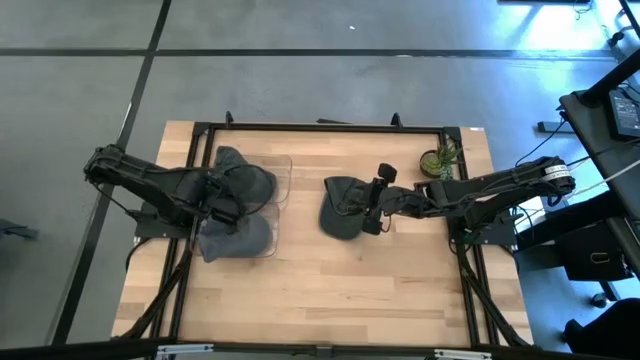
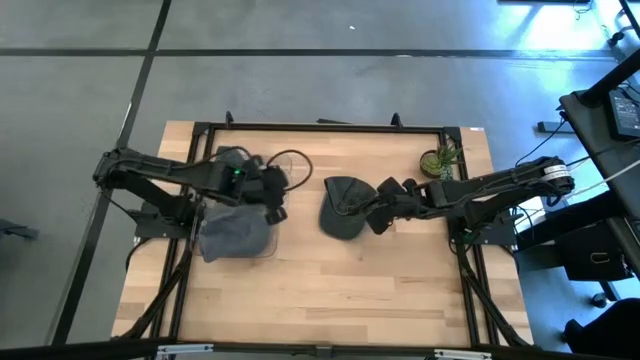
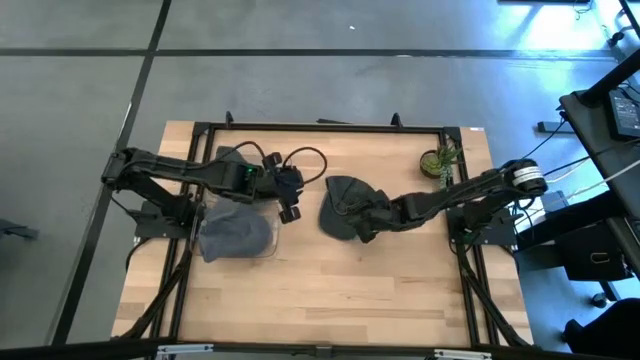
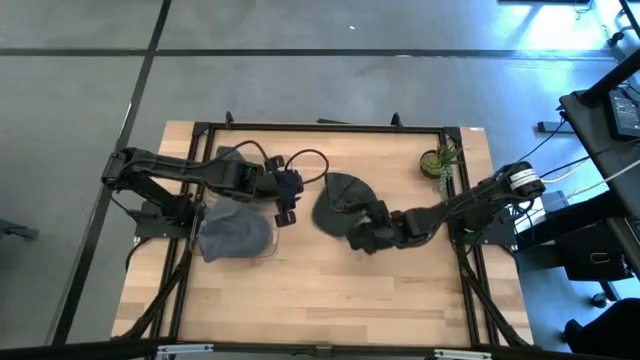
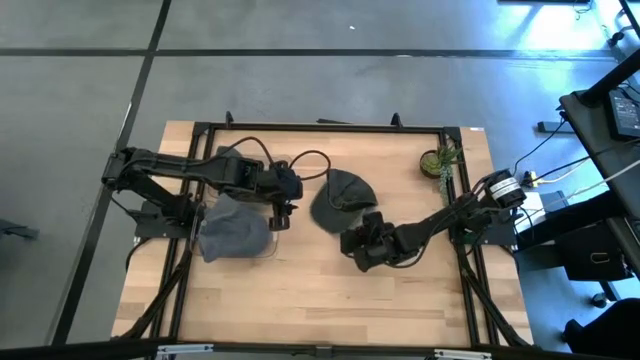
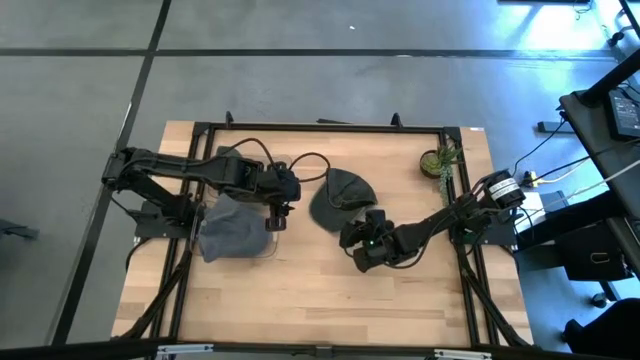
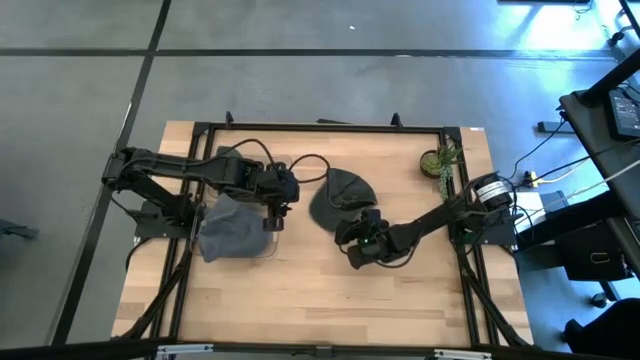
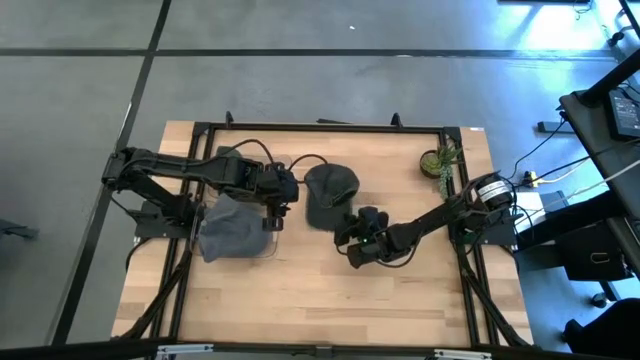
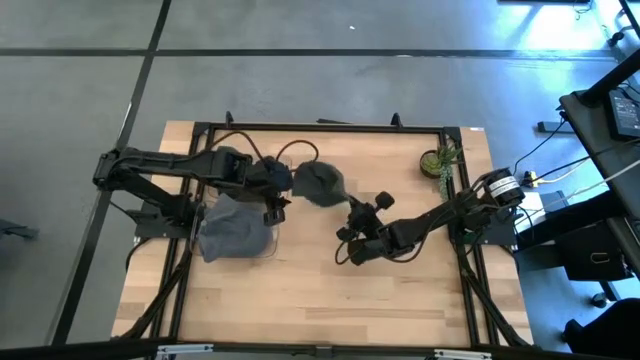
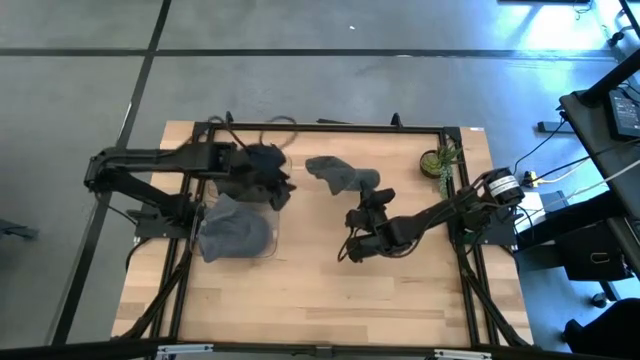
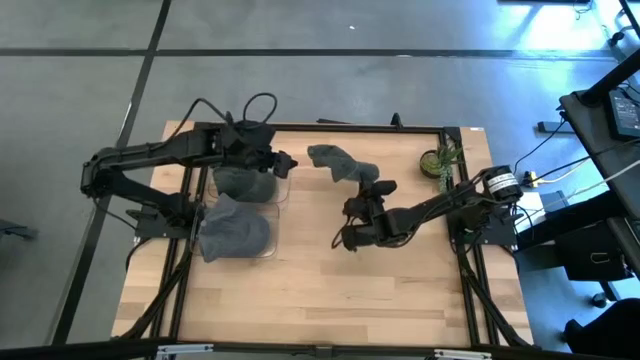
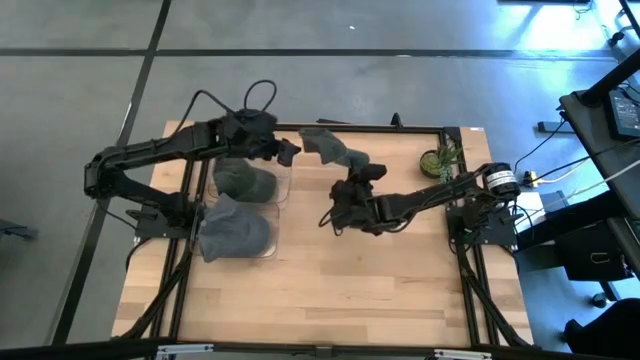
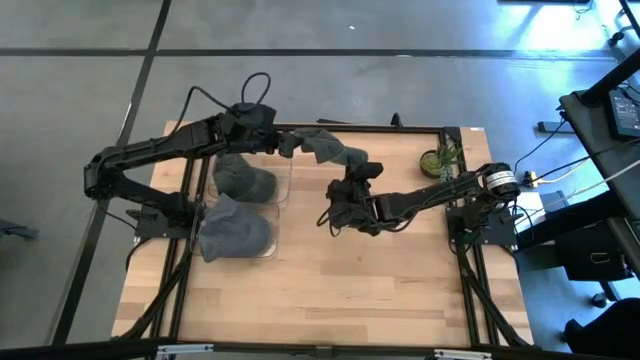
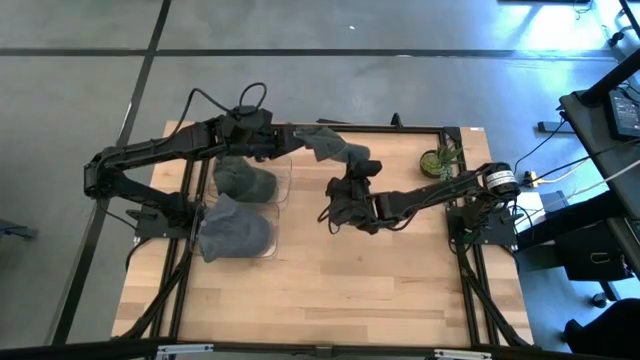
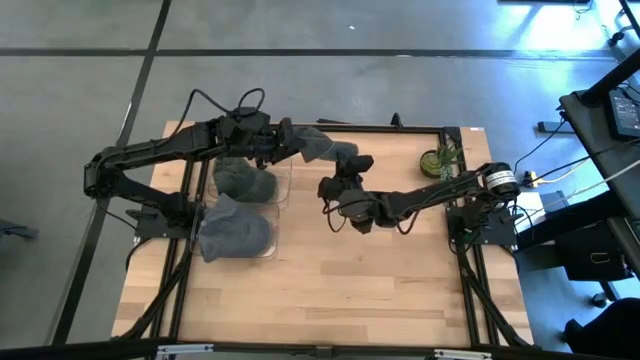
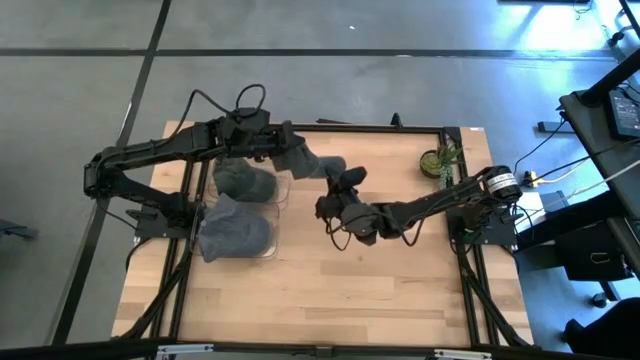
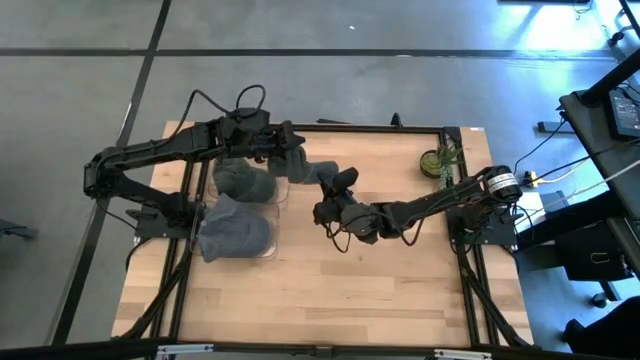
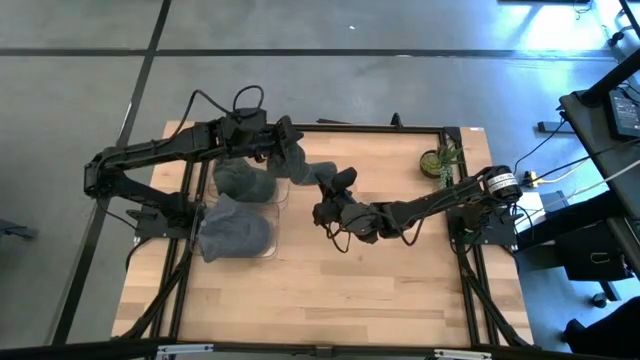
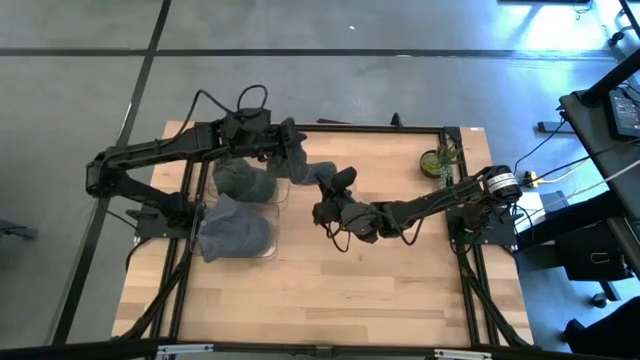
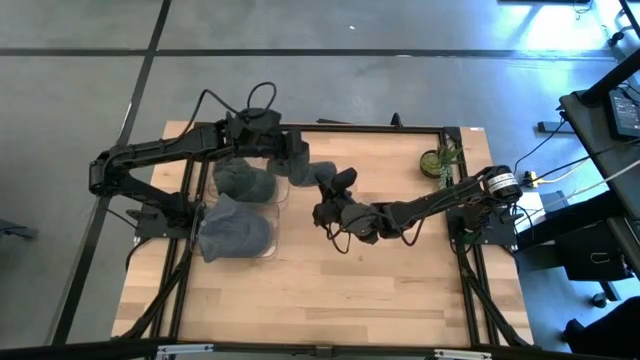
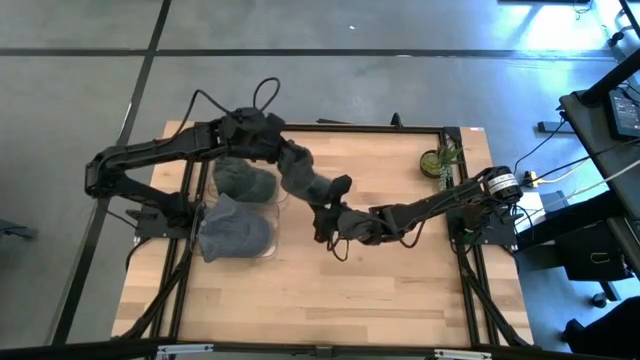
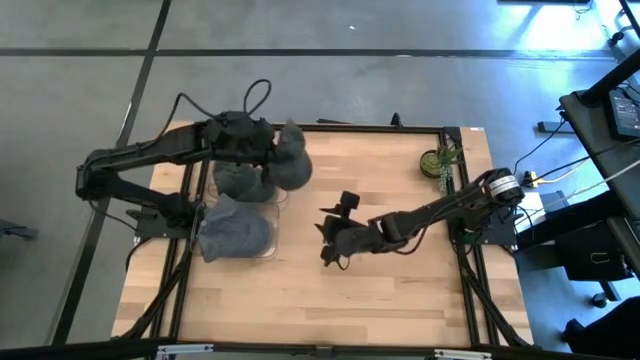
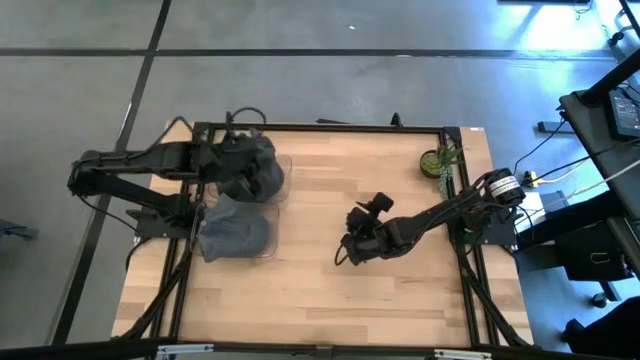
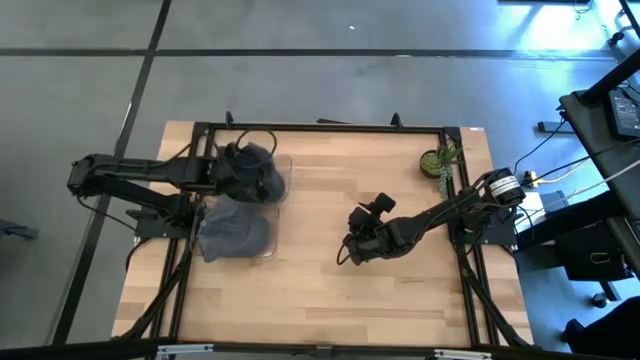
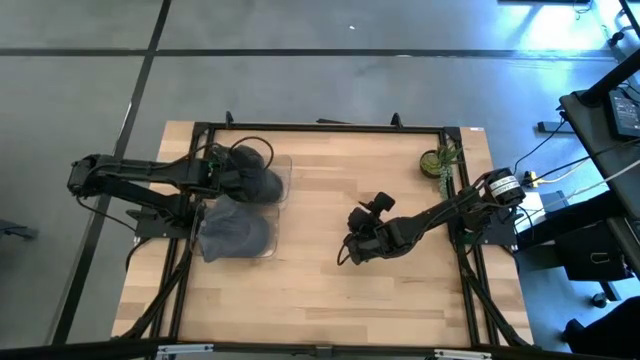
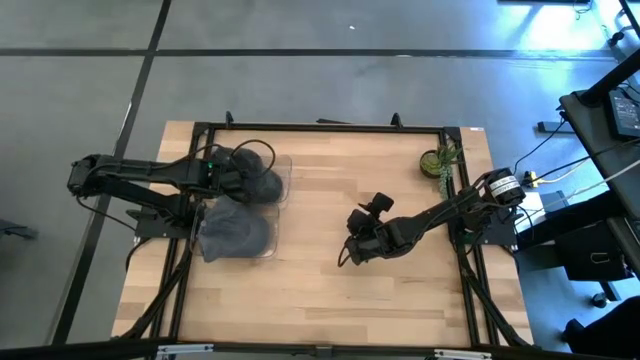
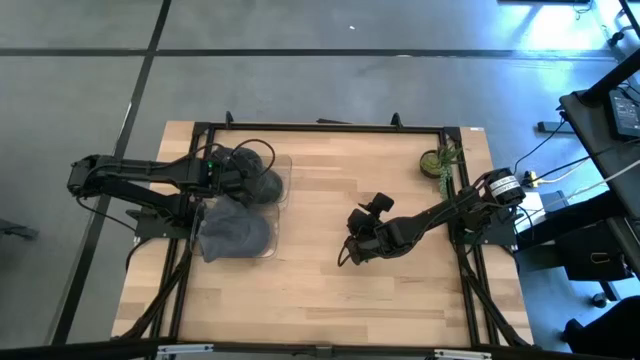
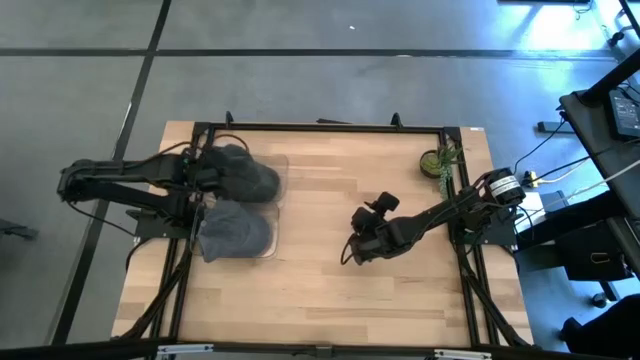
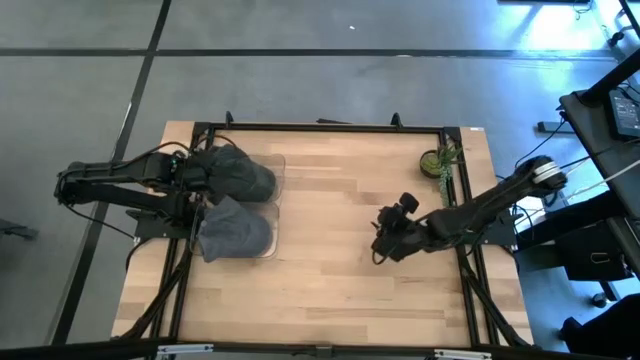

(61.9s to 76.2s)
Task: Pick & Place hat
Put the black cap into the top transparent bin

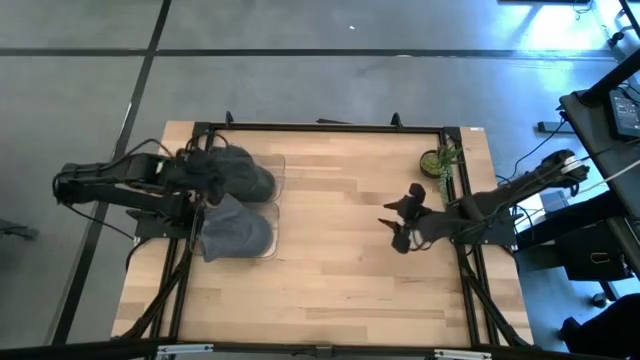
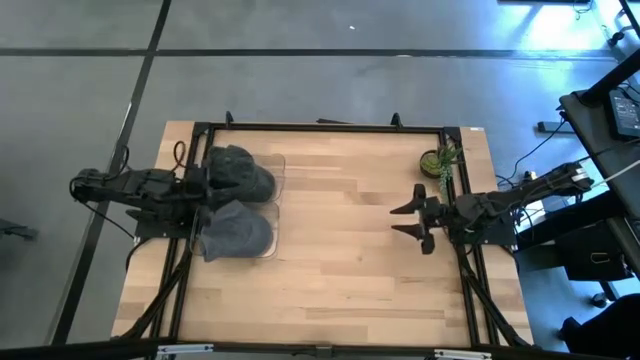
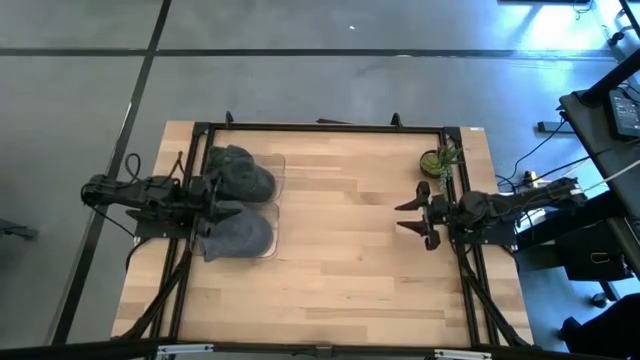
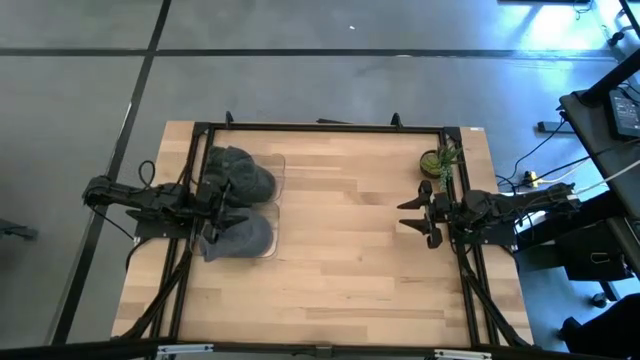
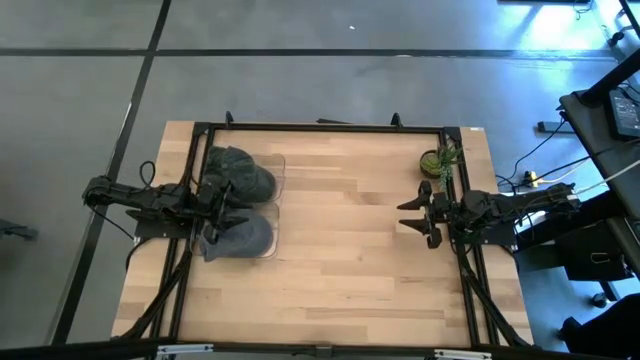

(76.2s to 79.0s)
Return to Home Position

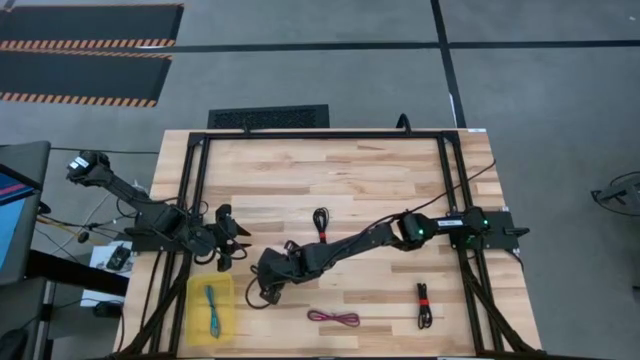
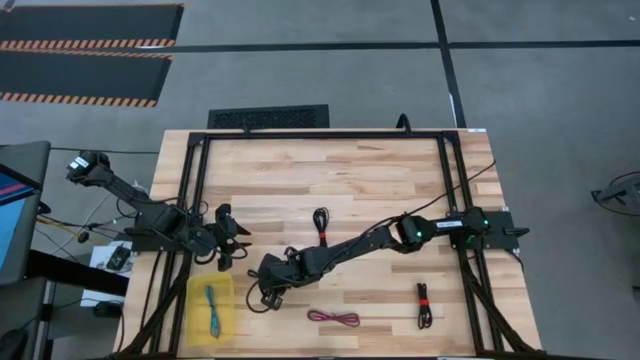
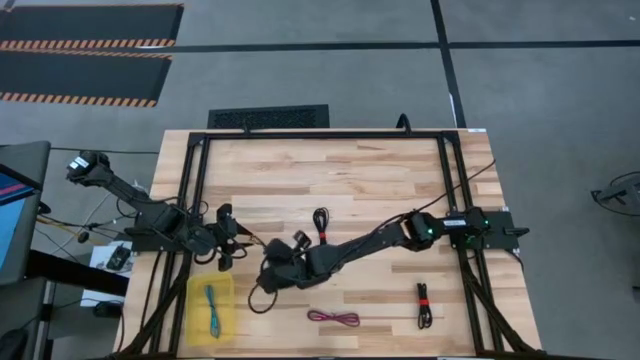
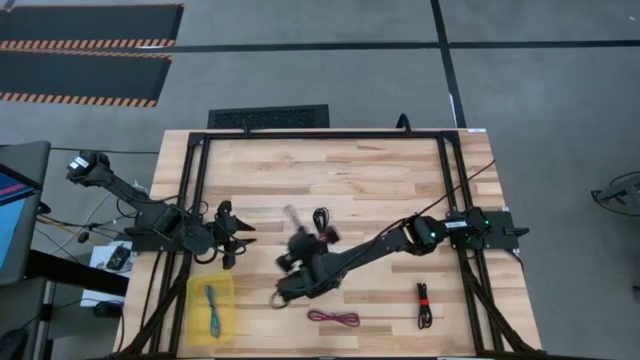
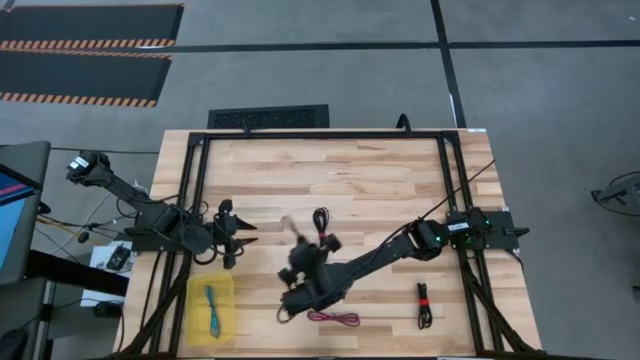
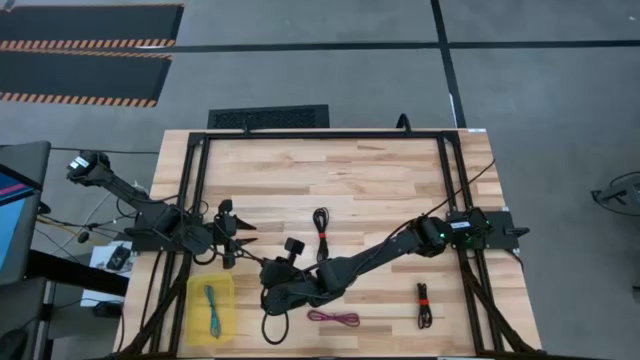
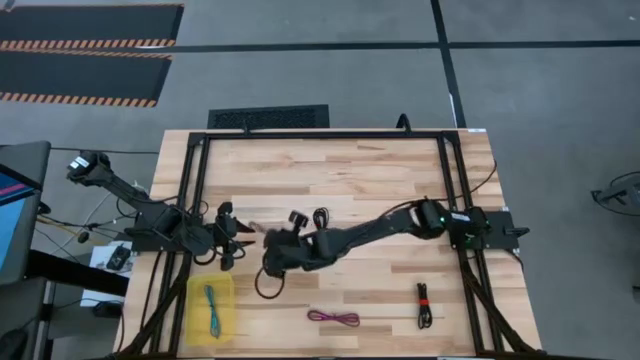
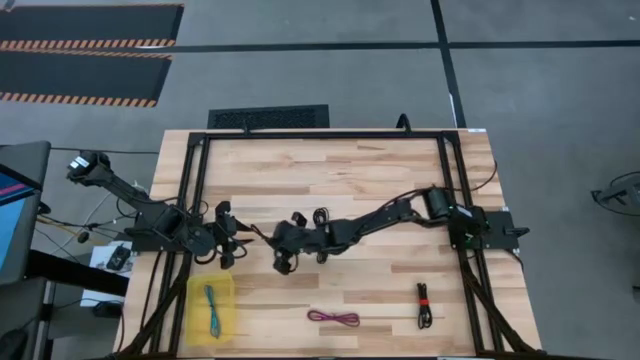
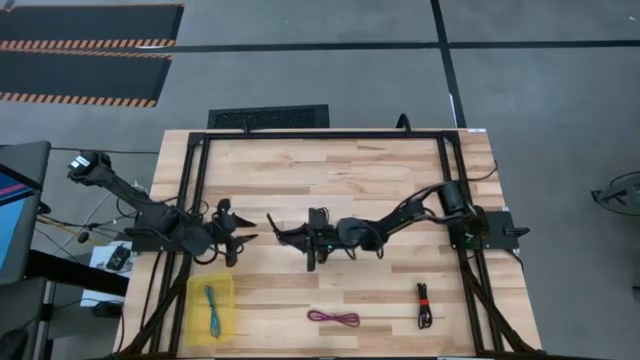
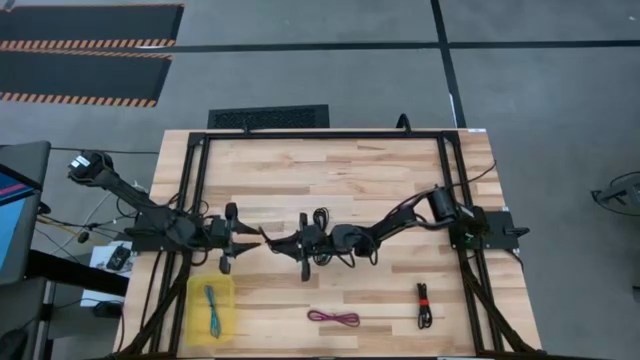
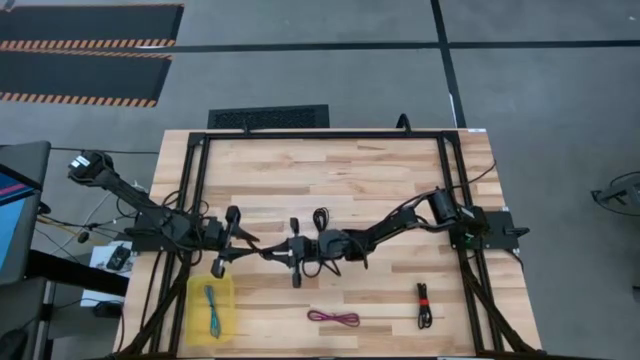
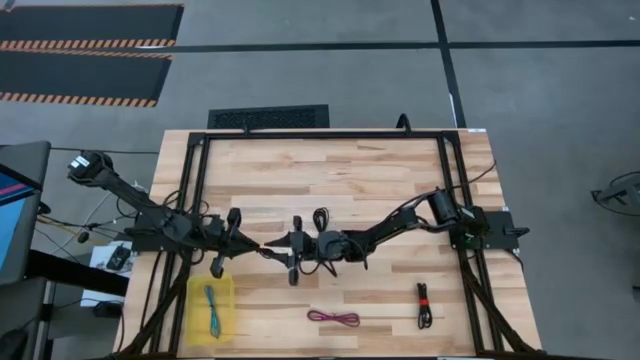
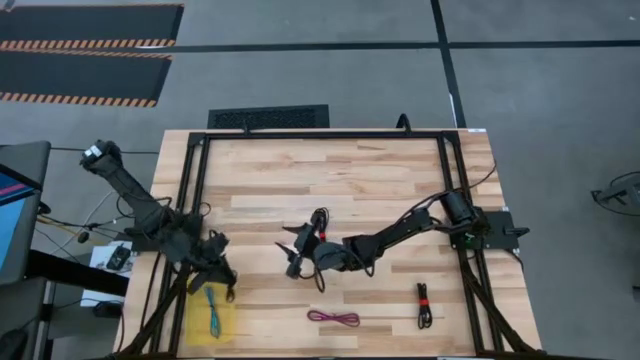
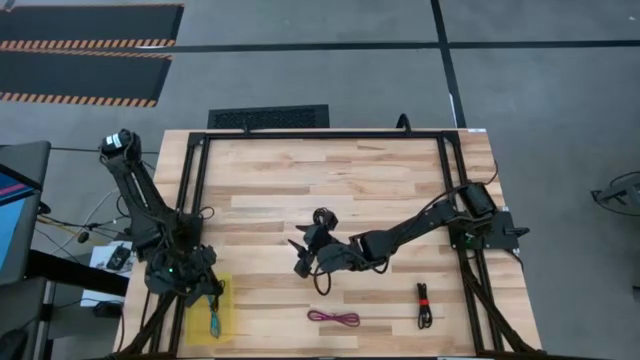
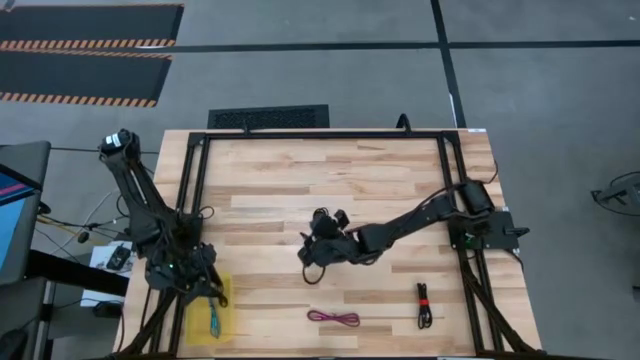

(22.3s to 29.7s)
Task: Pick and place USB-C Cables
Put the top left black charger cable into the yellow bin
